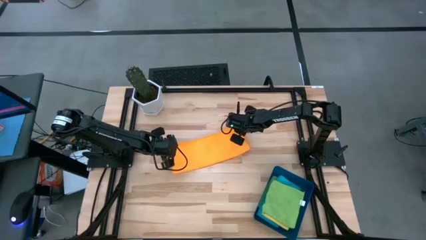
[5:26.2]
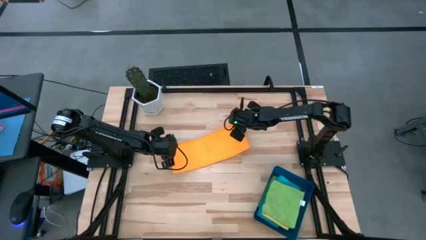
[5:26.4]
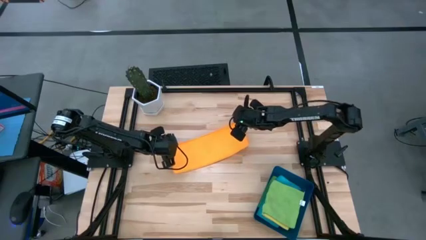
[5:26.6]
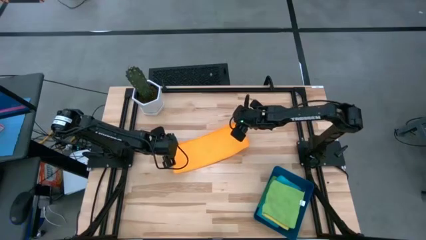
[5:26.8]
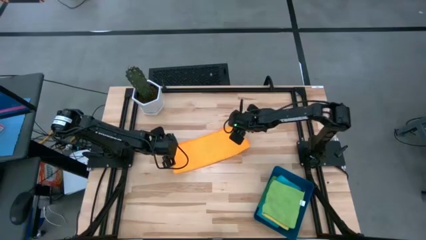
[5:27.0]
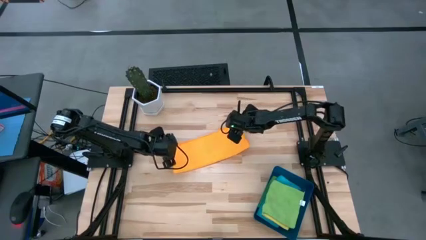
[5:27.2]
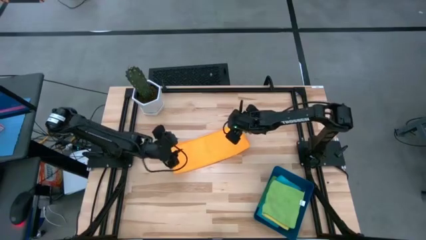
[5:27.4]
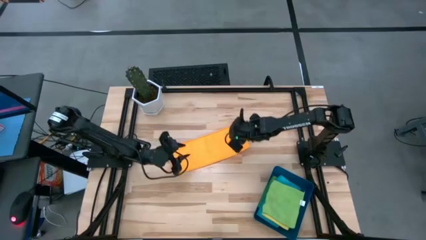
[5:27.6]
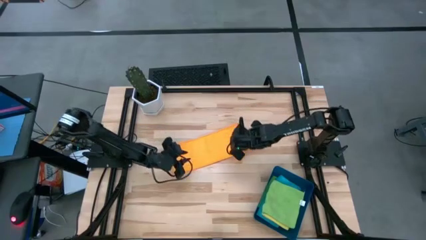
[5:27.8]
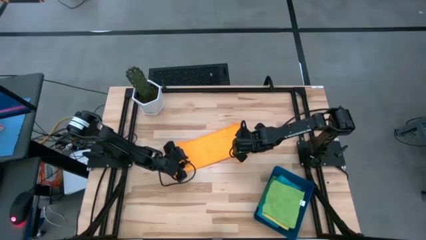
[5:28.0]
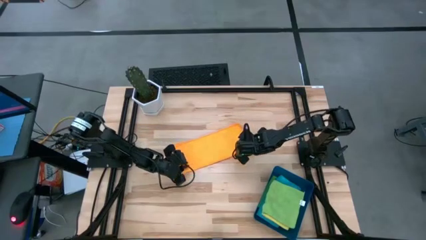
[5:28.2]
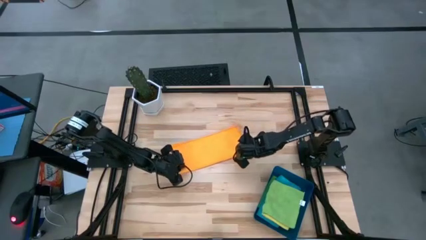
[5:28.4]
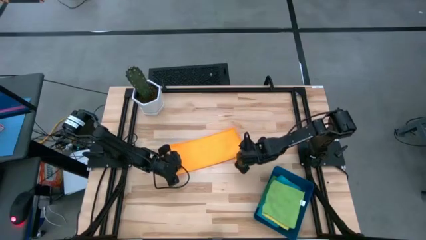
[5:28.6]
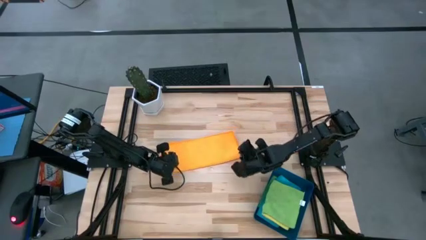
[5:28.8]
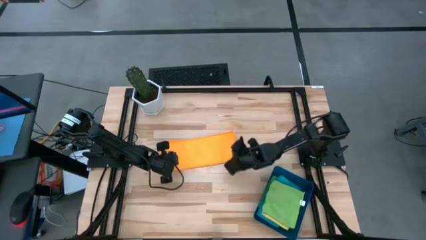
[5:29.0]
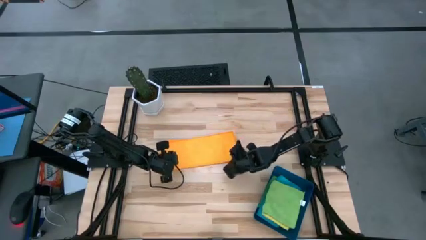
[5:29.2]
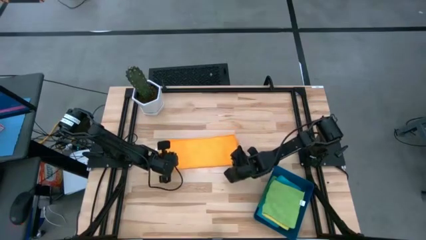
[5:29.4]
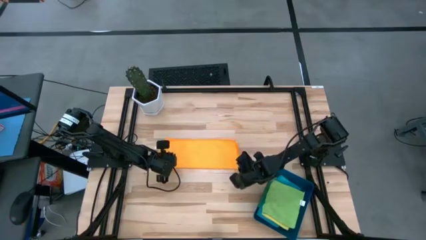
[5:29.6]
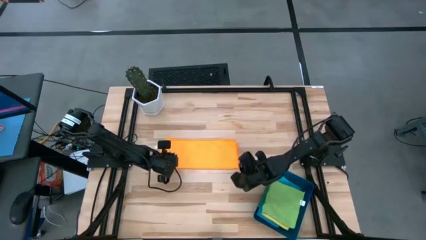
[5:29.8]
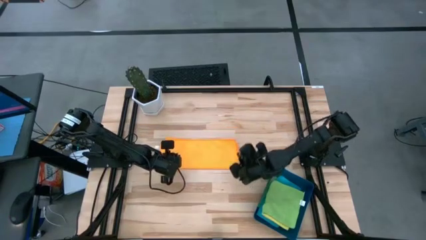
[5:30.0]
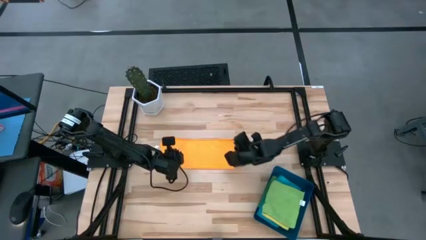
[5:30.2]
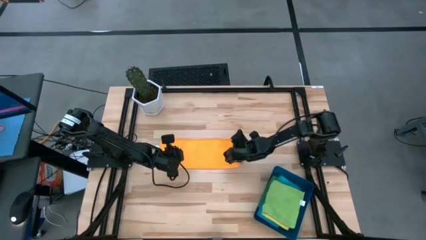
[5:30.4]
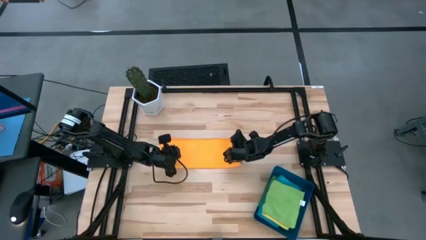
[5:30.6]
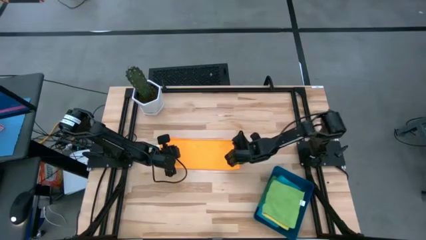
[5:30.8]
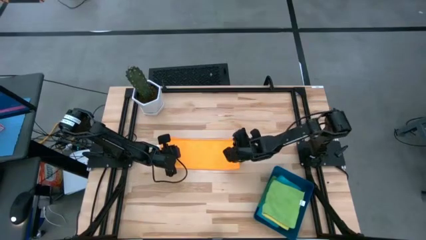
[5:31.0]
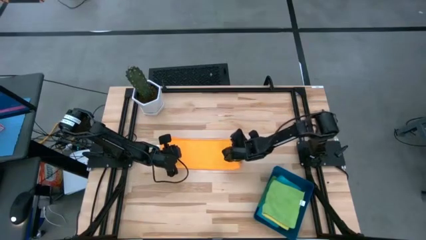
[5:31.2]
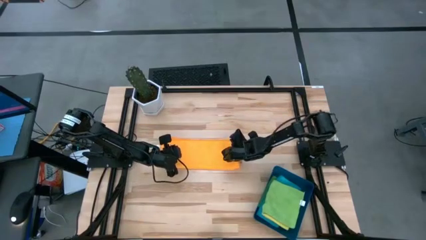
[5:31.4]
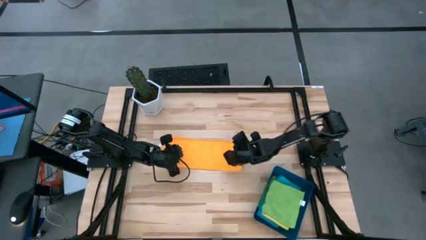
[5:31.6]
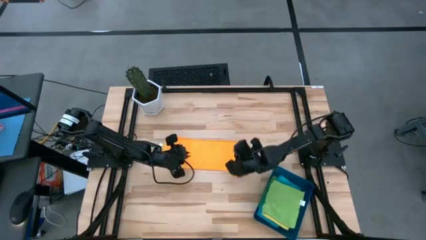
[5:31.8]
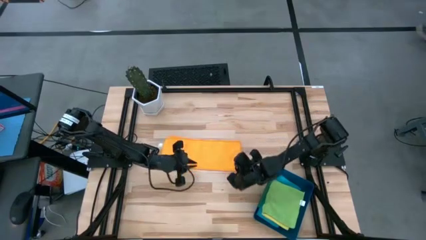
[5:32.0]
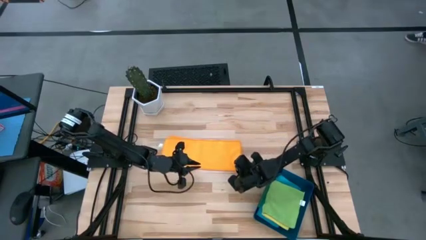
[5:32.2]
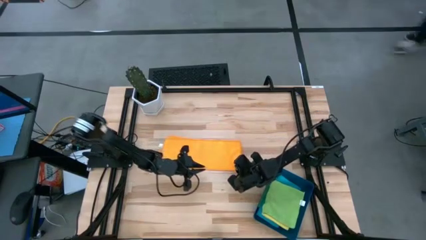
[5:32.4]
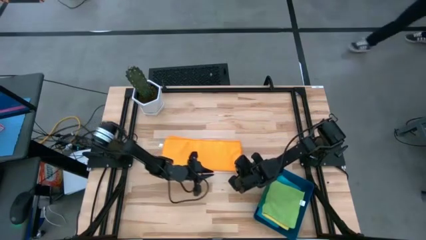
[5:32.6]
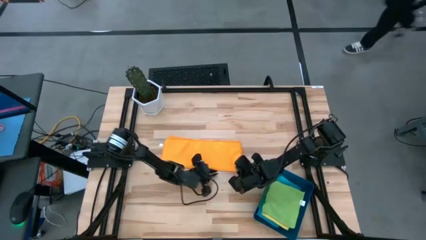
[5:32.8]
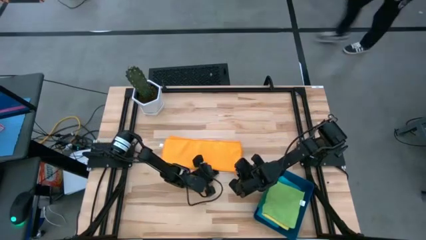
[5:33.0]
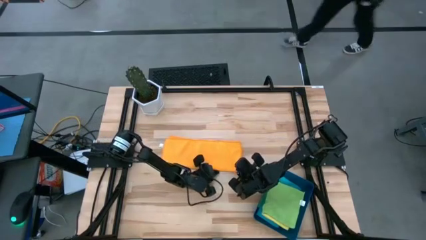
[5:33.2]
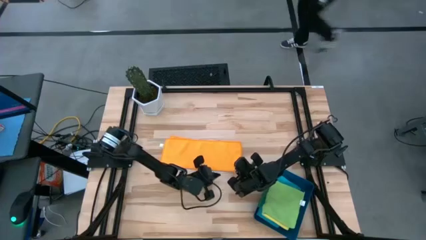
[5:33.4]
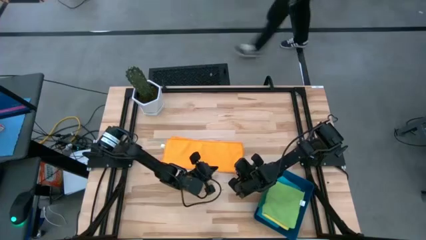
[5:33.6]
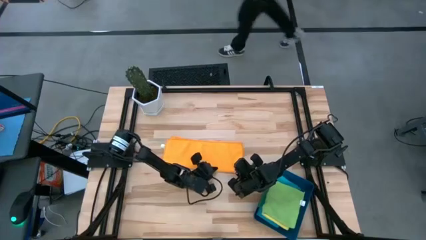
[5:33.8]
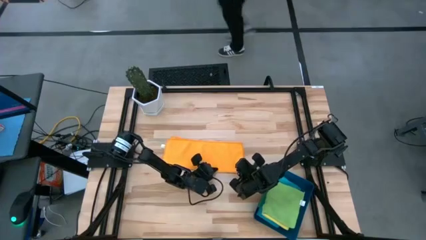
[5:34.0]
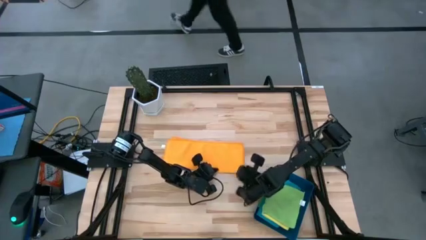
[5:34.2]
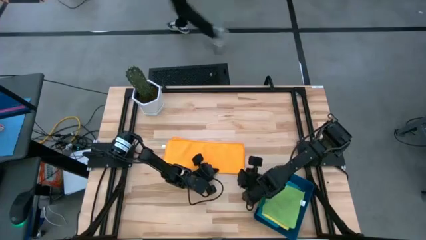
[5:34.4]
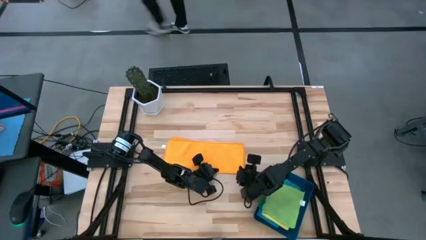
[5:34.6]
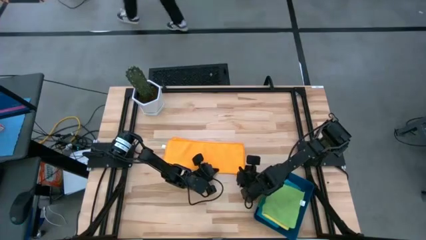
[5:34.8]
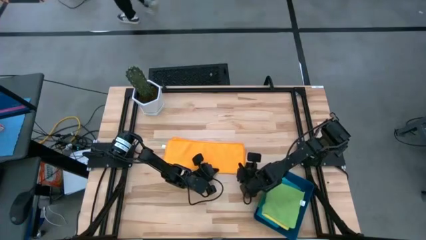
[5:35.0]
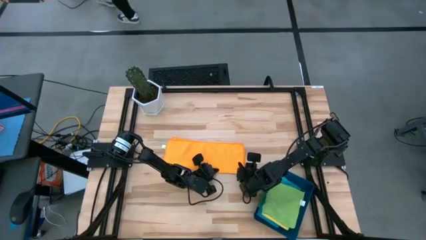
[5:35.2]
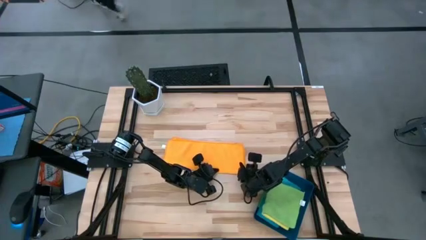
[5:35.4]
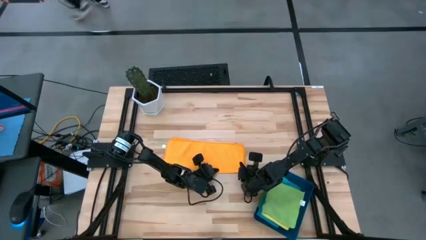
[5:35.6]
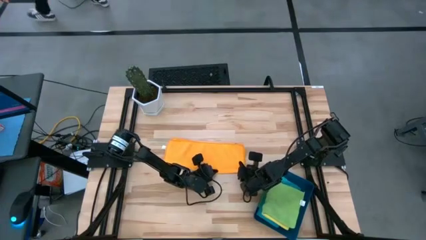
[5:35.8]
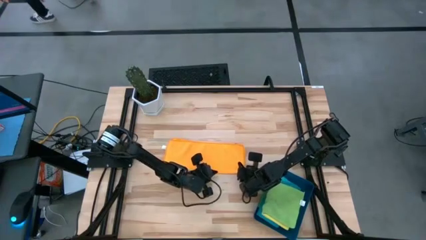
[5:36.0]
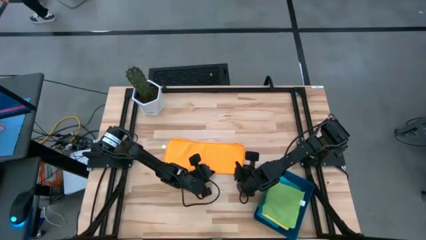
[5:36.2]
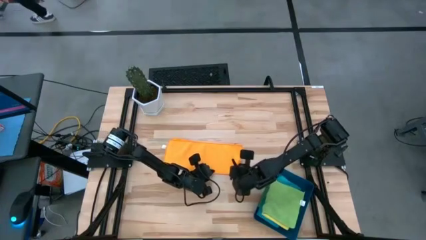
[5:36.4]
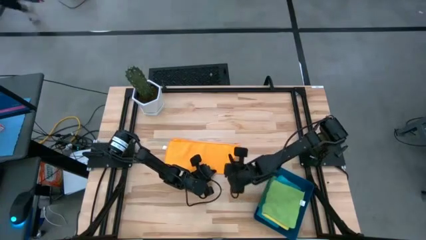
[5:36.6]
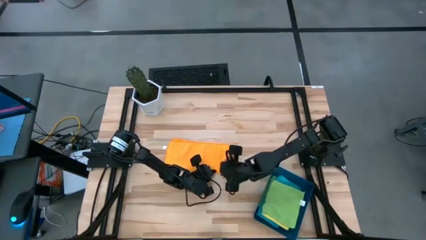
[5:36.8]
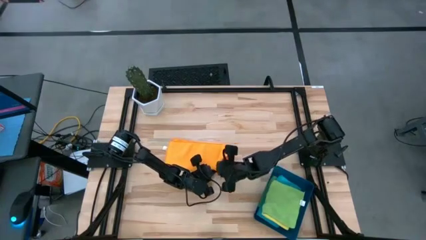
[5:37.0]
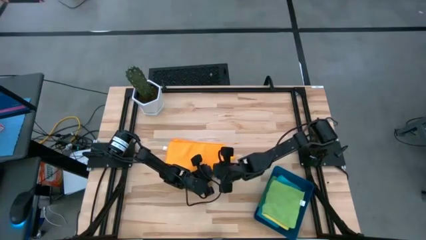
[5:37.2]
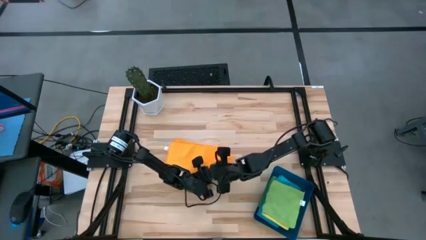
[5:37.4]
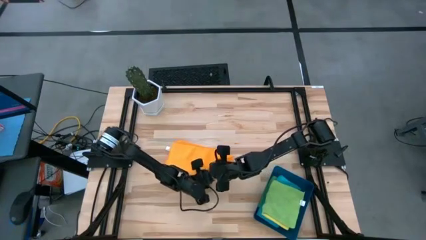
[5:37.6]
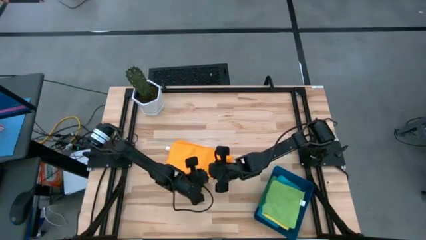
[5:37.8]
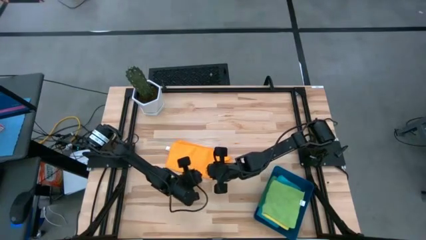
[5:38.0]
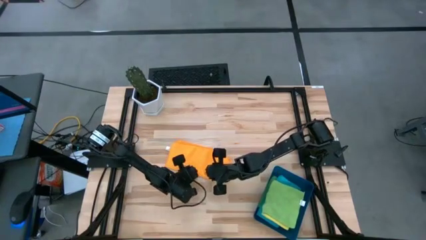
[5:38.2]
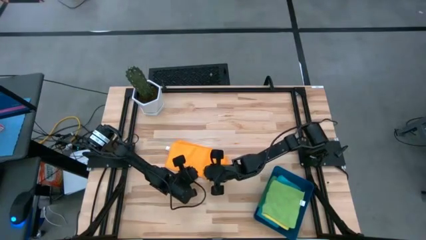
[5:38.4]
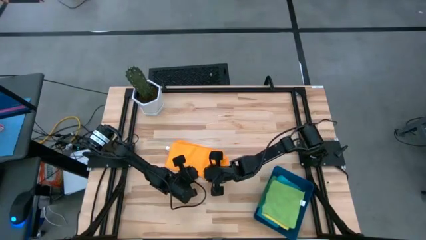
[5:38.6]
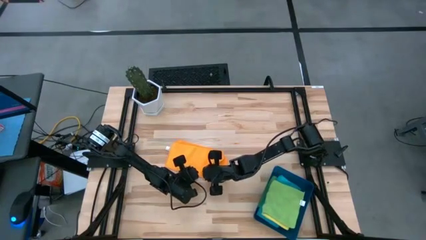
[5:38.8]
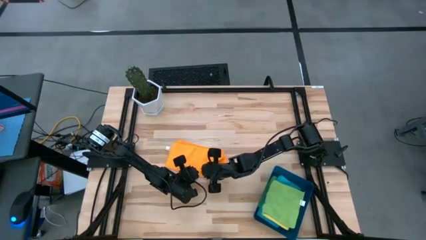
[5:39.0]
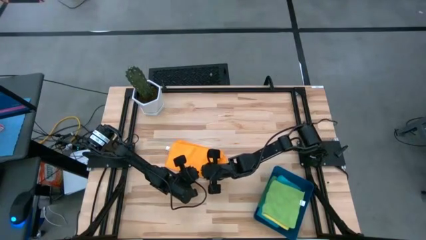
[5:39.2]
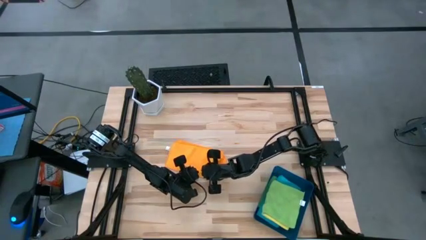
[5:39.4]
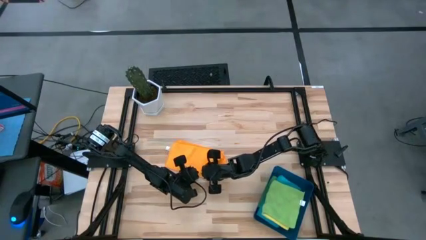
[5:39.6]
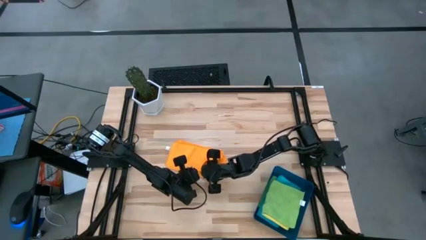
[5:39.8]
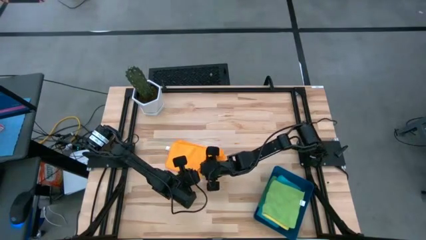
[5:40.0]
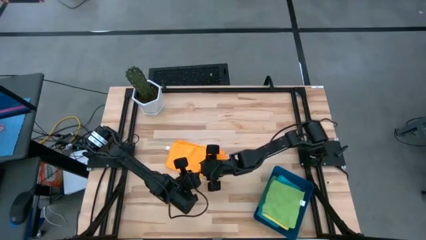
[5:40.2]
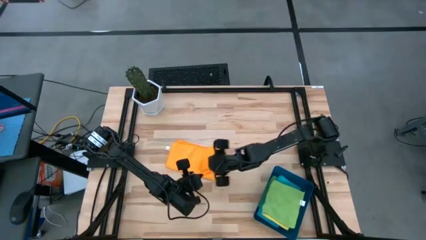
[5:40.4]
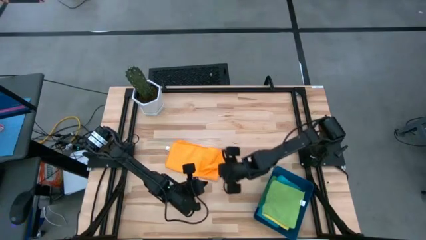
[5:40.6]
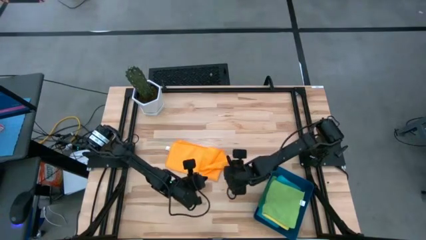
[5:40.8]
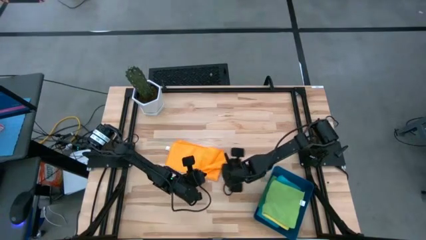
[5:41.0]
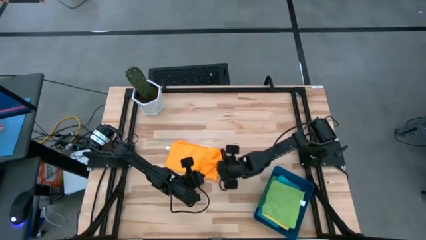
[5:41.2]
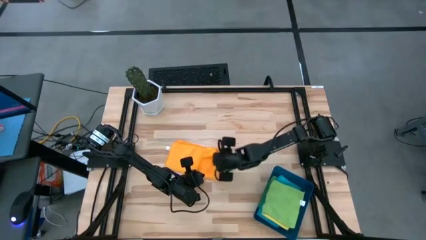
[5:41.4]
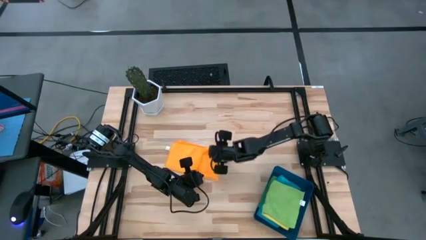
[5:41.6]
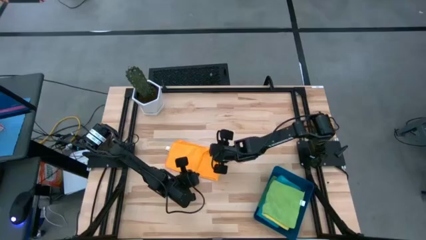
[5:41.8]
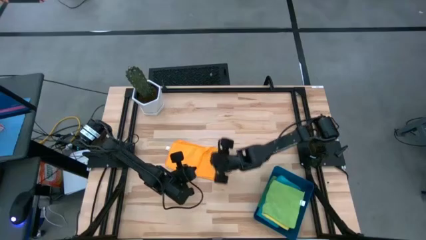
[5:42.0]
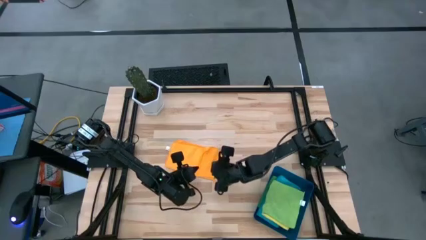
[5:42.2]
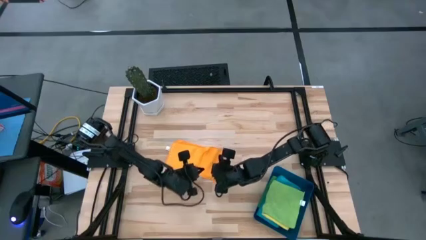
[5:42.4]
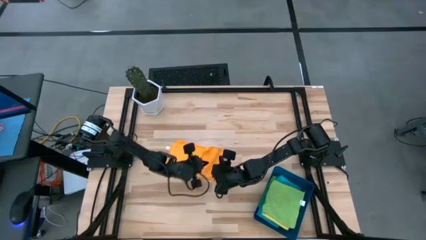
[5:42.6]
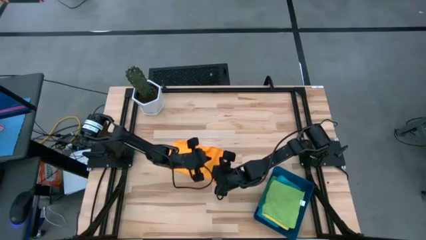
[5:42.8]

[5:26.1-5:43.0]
Task: Fold microfiber towels
Fold the orange microfiber towel
